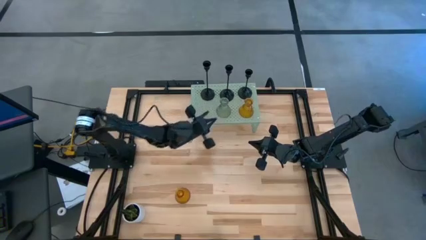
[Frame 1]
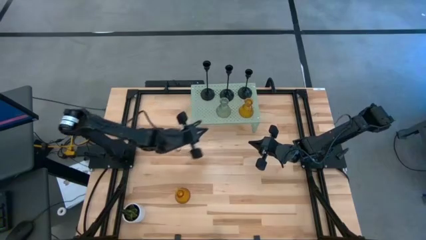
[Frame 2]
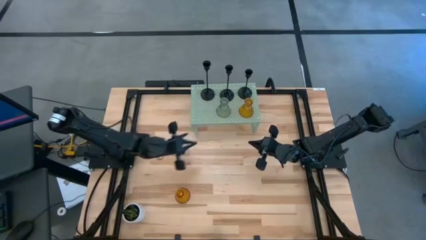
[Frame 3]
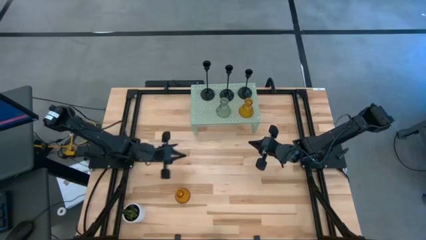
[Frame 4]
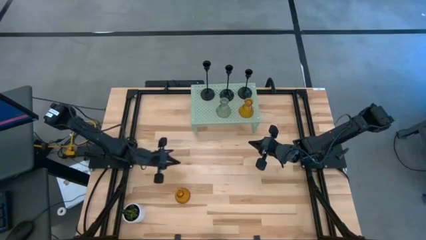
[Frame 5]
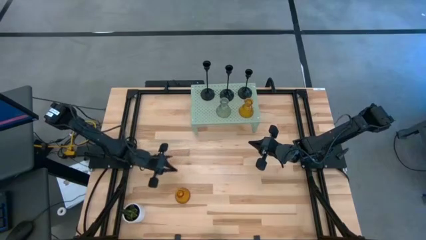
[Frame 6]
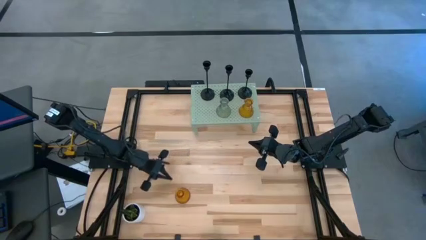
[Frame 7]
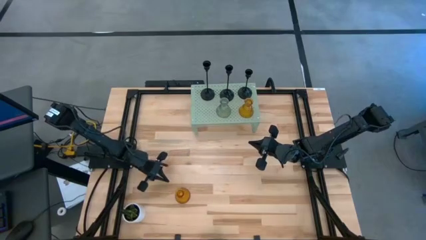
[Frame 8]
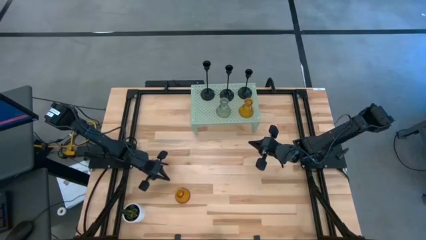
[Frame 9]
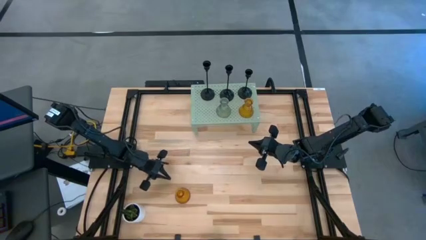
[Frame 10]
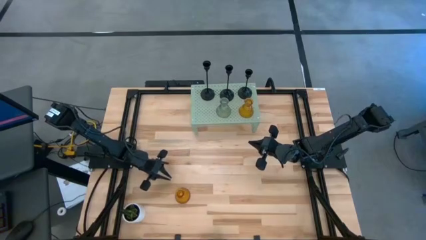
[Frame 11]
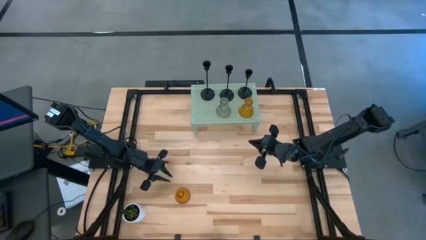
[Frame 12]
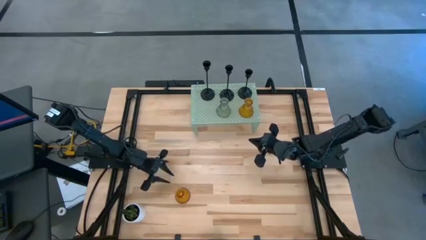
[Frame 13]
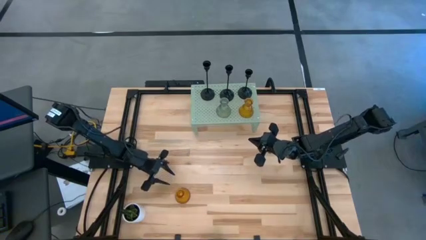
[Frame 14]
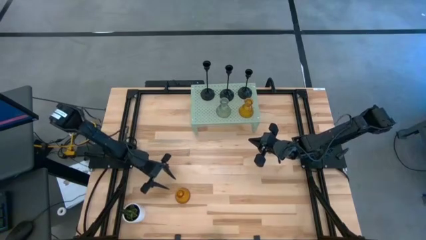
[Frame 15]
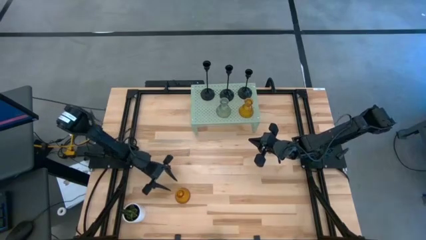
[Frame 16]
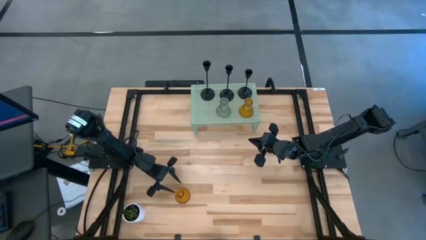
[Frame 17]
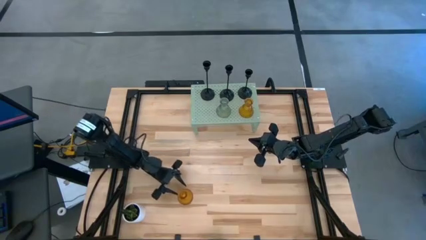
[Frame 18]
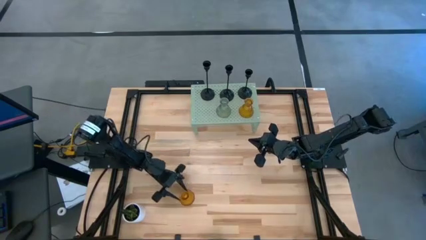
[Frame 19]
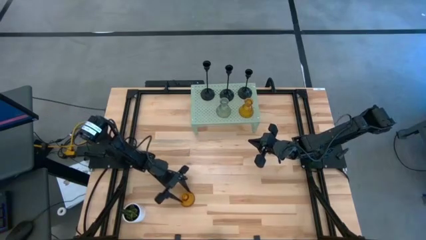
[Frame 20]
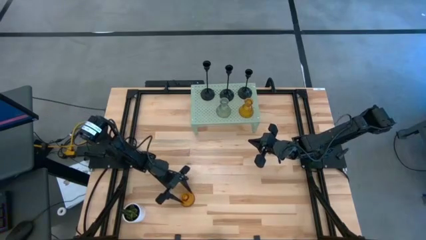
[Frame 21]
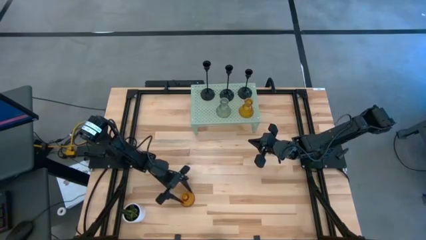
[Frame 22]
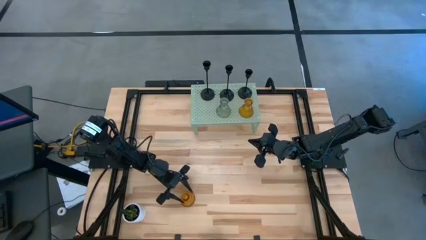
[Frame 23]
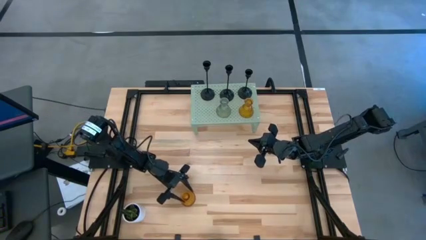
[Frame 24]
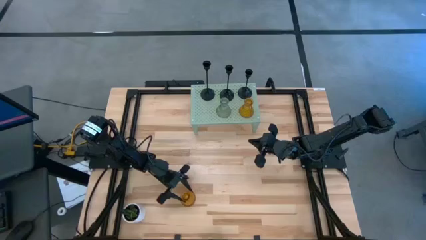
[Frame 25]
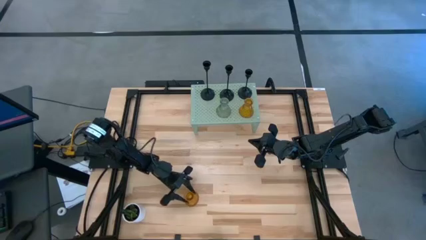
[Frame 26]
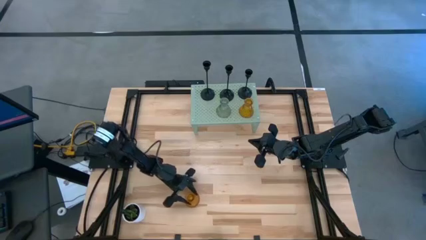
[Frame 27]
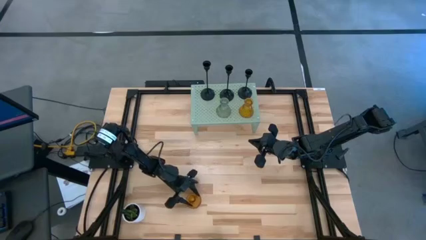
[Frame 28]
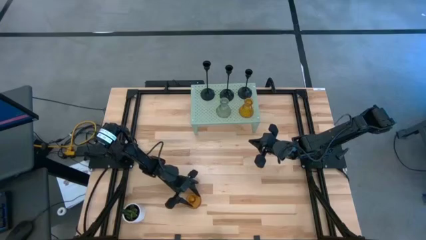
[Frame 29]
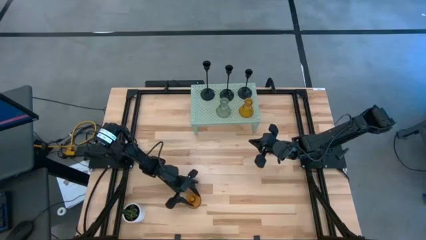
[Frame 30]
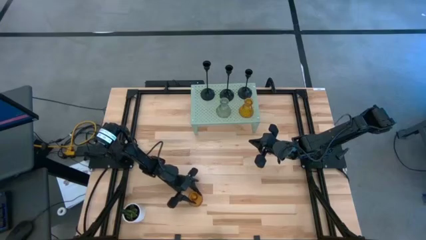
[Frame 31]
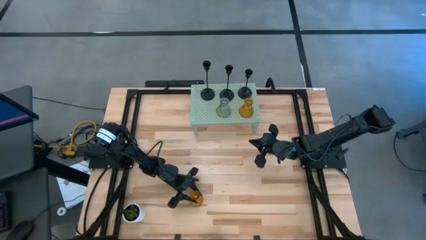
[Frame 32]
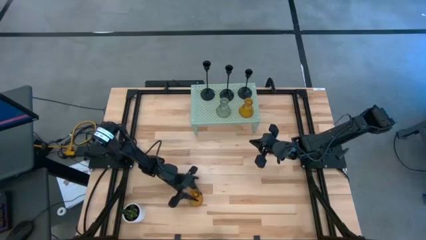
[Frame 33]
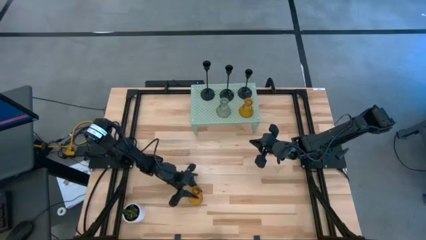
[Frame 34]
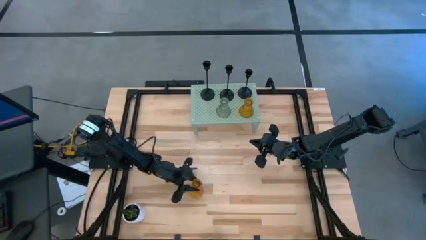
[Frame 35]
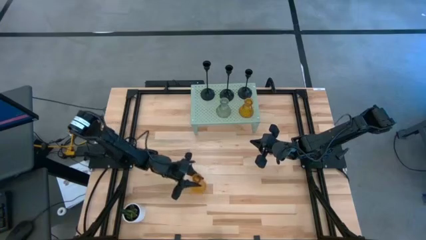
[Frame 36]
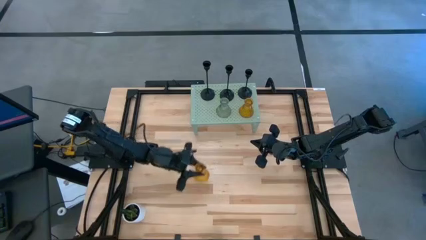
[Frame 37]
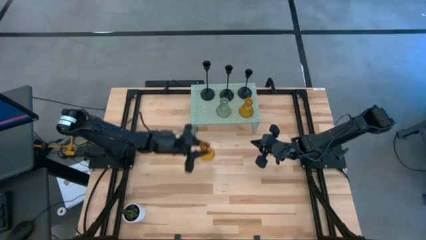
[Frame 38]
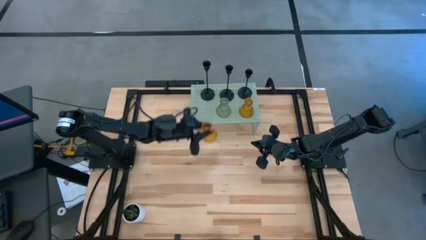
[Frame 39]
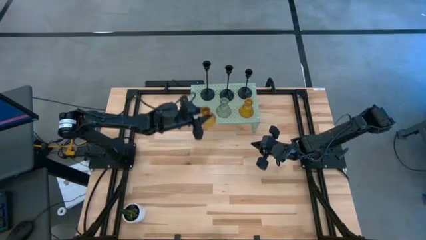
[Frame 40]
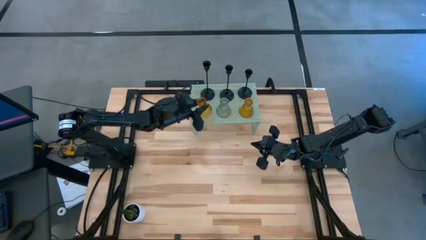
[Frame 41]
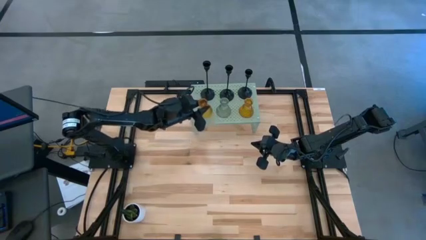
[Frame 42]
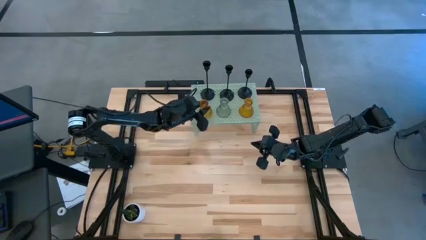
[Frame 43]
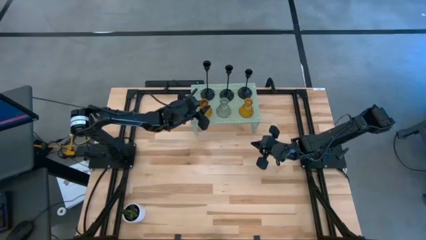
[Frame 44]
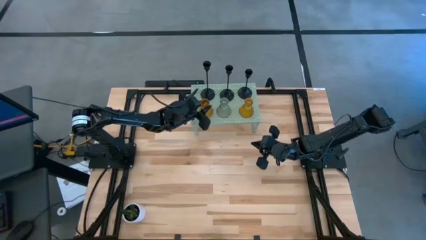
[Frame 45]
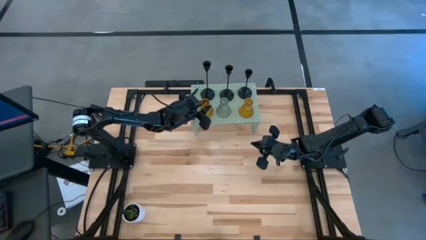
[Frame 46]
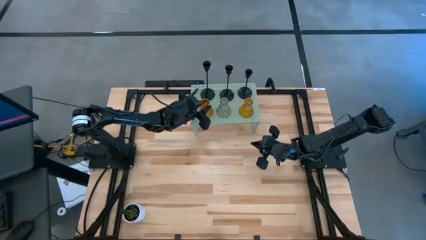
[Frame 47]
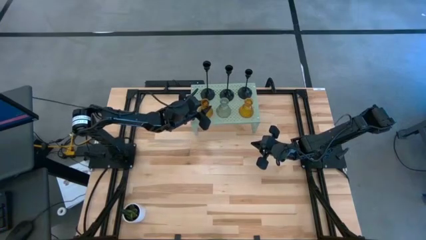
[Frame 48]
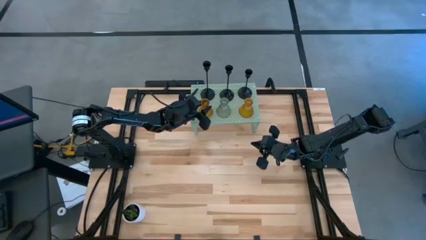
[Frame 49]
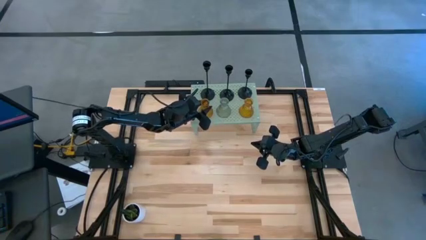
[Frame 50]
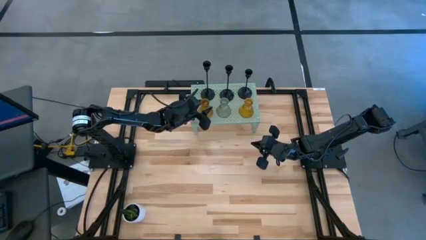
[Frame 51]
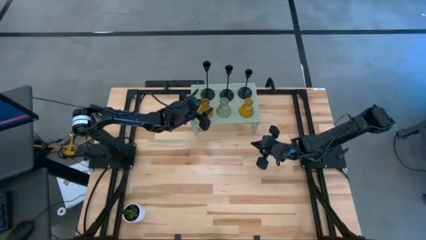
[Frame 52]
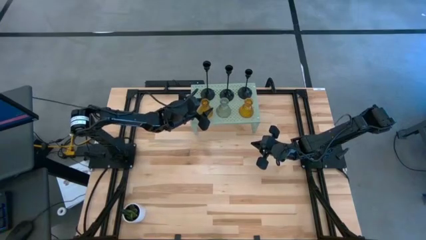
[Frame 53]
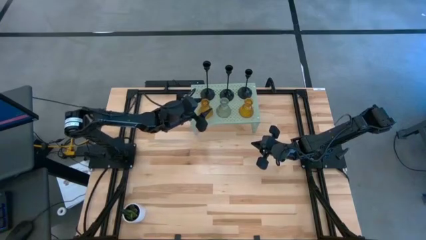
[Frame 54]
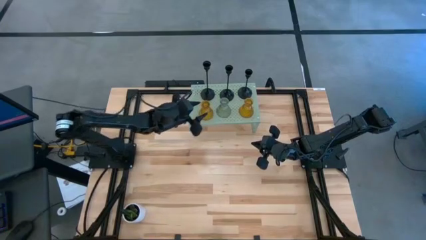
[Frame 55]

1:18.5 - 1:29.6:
Task: Pick & Place candle stick holders
Put the brown glass candle holder on the shelf

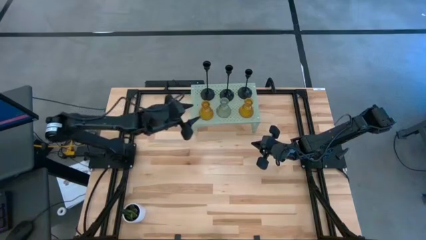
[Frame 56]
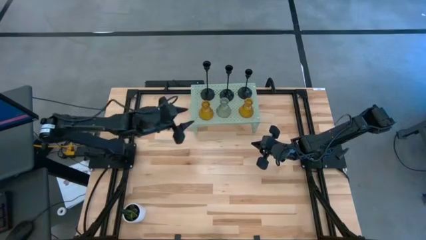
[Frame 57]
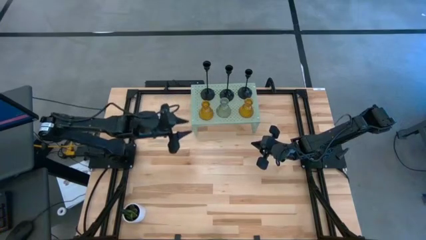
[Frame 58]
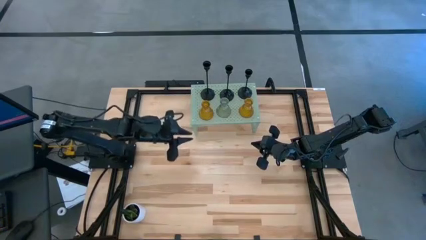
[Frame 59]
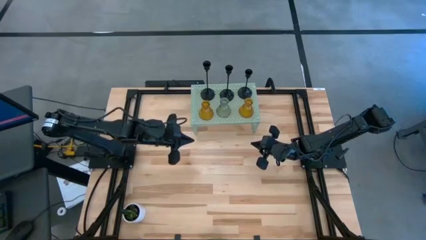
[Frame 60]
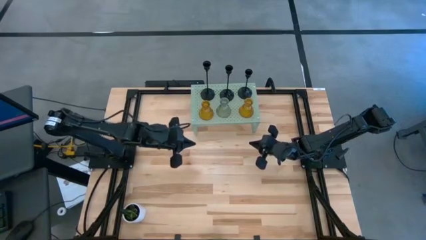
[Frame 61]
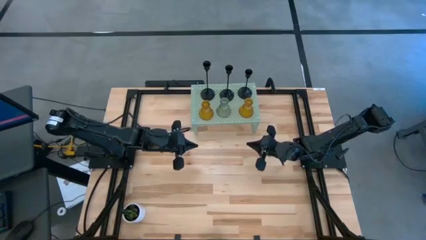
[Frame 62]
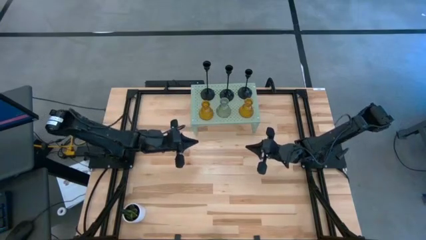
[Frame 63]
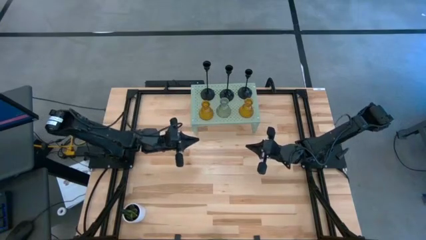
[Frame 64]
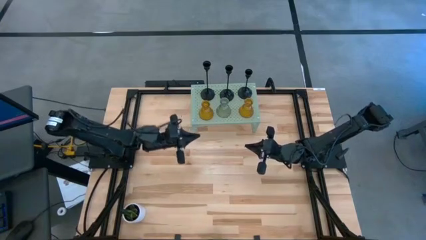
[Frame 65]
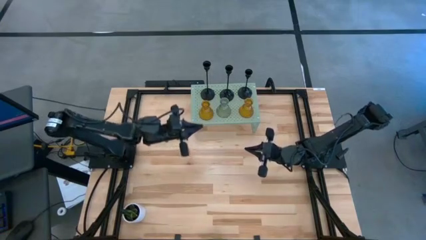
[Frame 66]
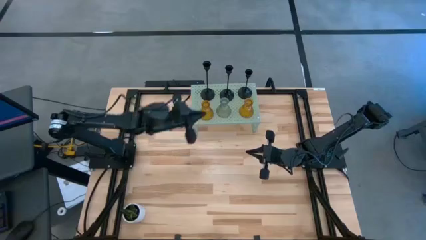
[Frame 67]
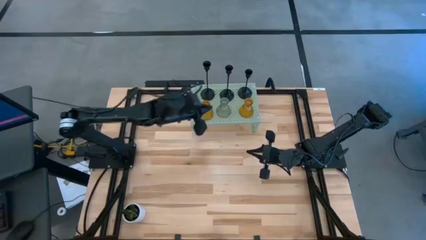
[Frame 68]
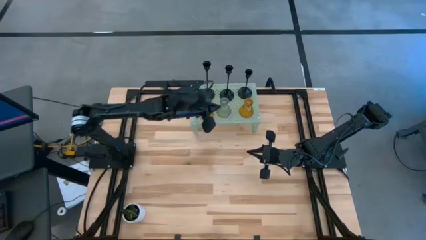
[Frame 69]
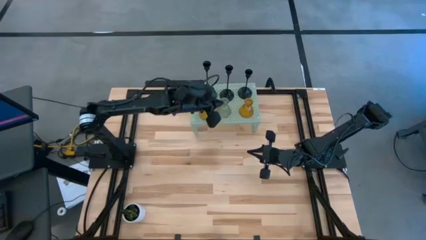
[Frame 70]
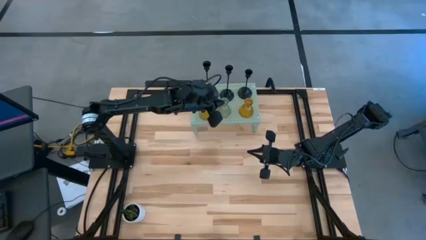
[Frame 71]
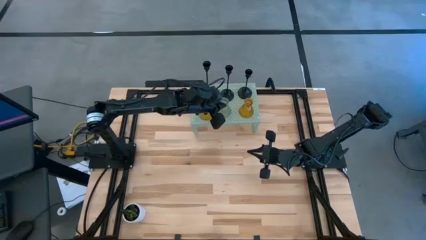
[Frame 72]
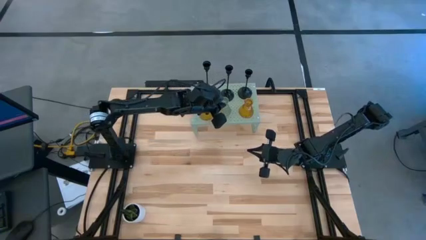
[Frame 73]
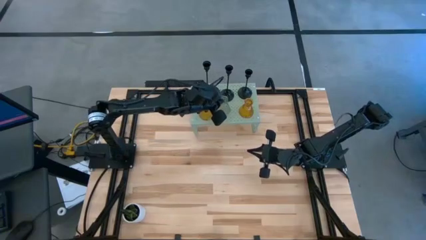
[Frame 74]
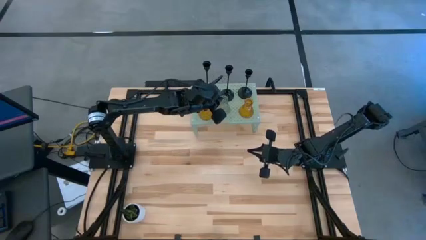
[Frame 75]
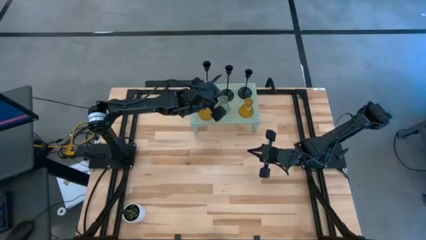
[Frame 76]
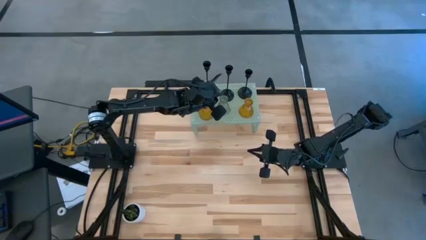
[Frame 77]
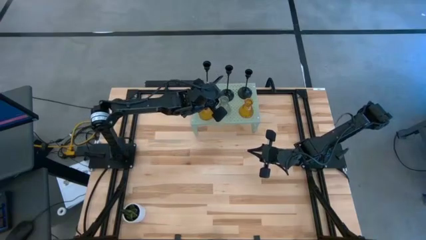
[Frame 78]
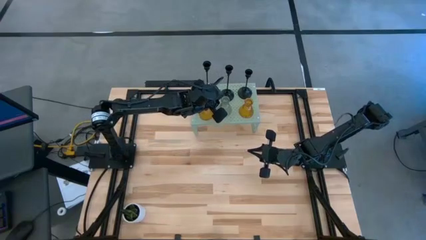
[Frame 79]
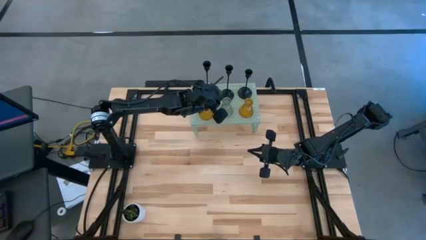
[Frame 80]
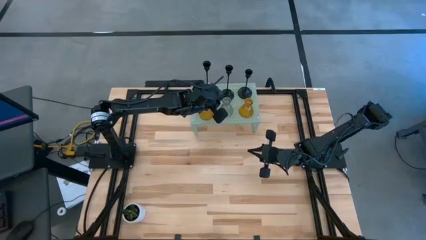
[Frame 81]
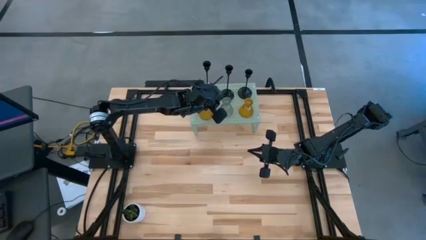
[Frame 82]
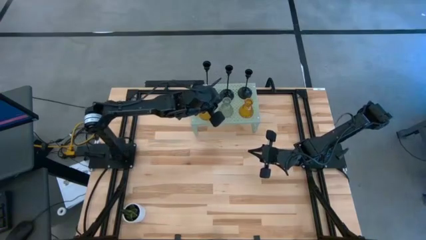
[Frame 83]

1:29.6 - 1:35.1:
Adjust the glass candle holder

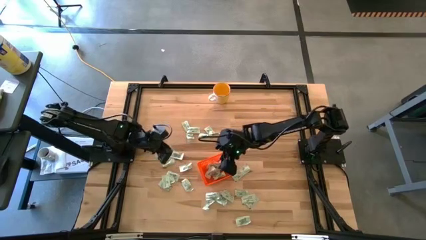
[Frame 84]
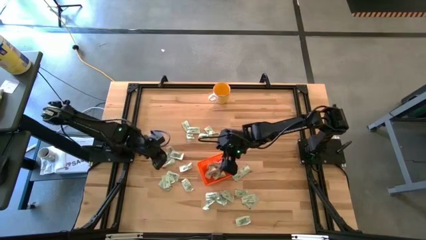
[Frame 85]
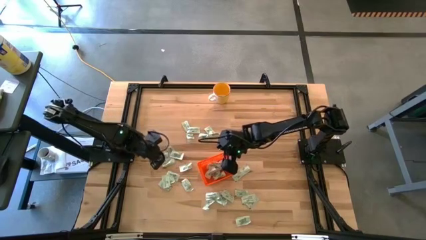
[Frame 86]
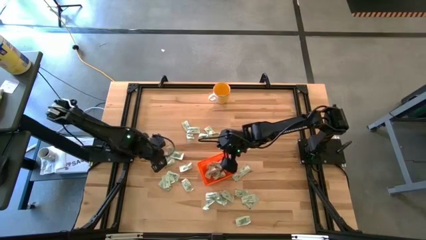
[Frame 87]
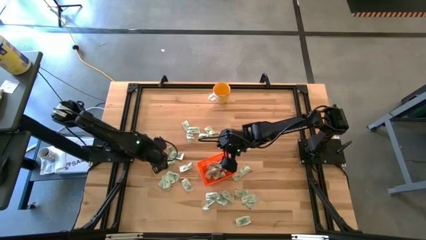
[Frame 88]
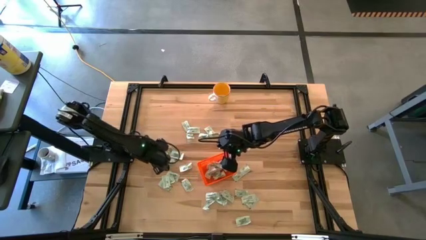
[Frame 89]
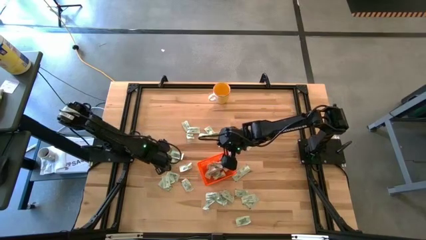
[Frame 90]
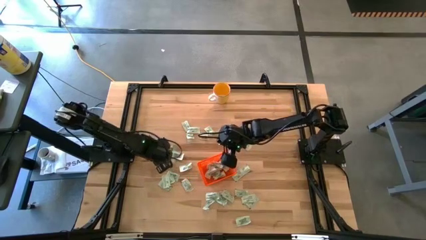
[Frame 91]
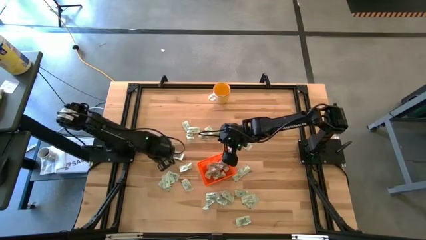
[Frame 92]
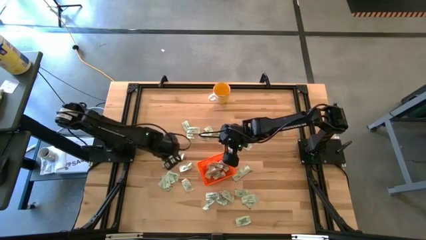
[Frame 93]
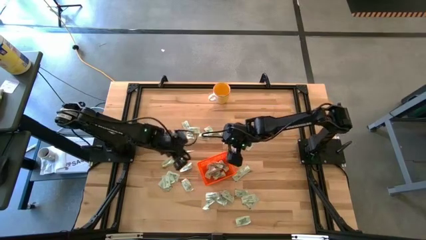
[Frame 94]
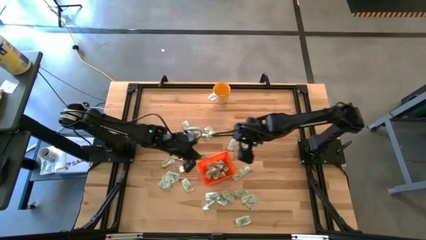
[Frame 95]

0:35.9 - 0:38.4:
Task: Pick and place Stevia / Truvia into bins
Put the stevia packet into the bin
